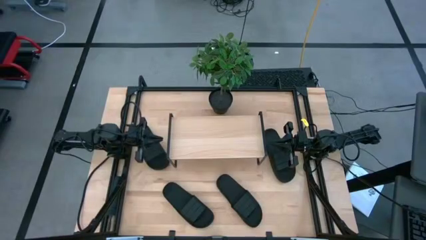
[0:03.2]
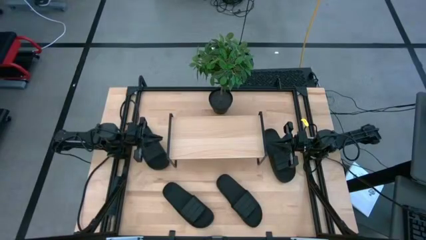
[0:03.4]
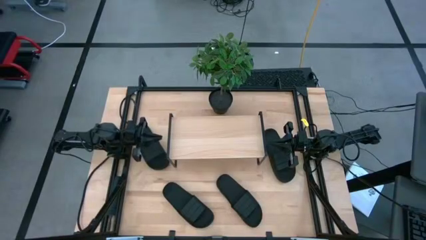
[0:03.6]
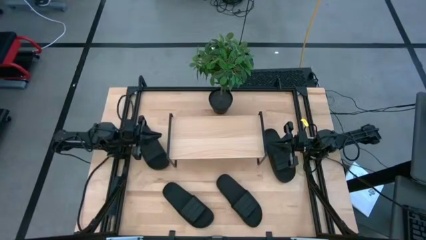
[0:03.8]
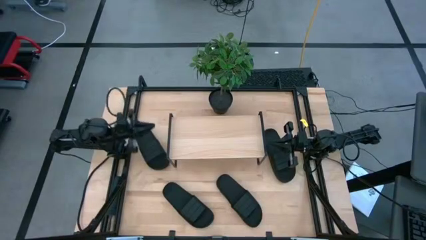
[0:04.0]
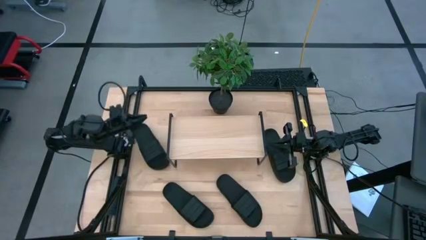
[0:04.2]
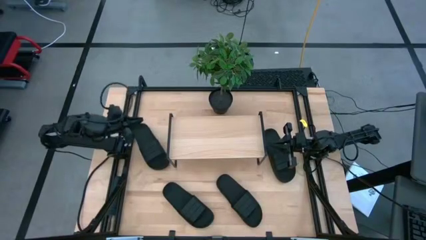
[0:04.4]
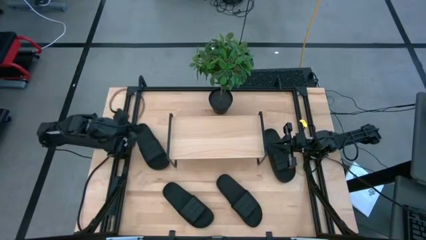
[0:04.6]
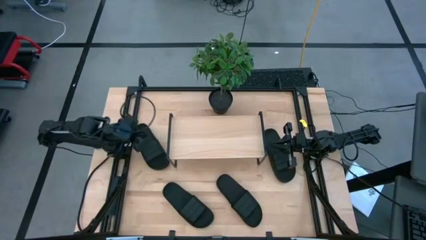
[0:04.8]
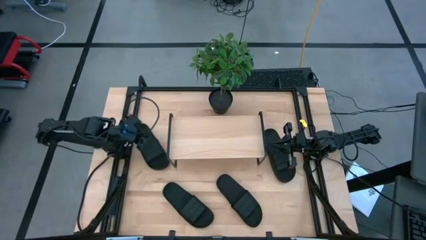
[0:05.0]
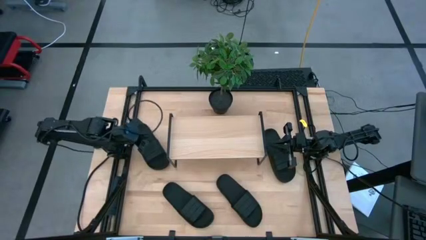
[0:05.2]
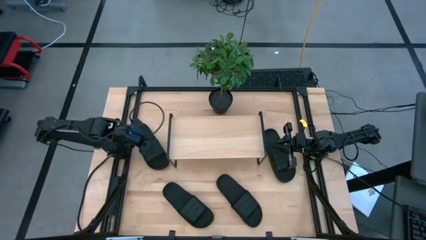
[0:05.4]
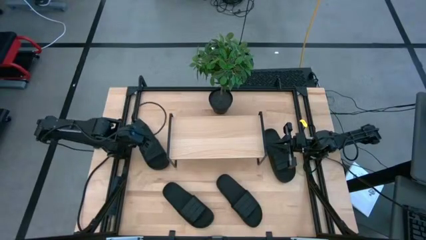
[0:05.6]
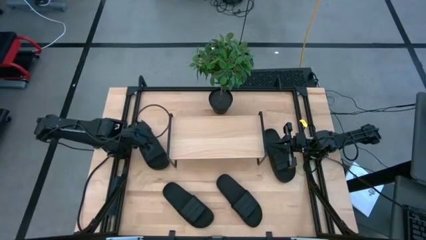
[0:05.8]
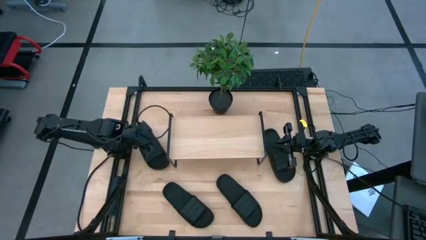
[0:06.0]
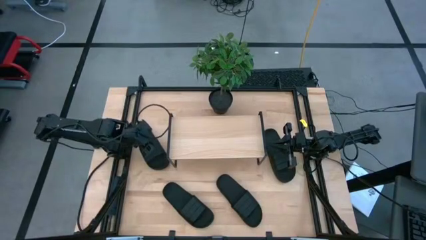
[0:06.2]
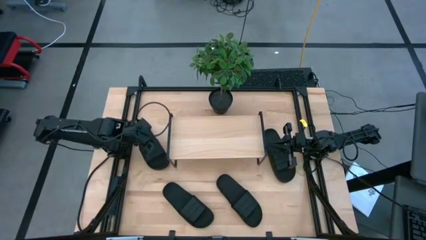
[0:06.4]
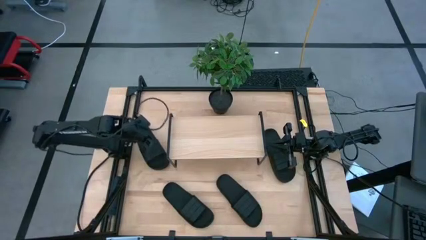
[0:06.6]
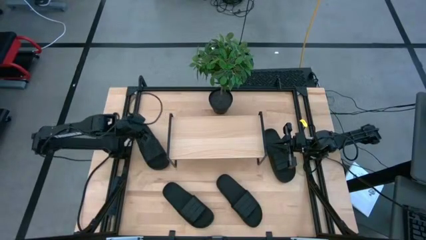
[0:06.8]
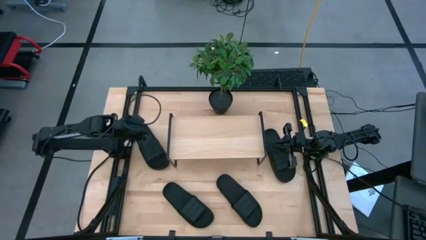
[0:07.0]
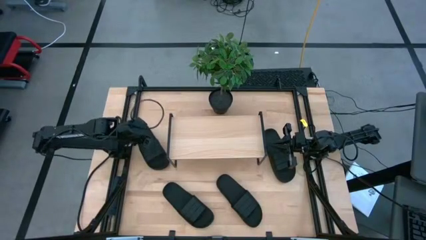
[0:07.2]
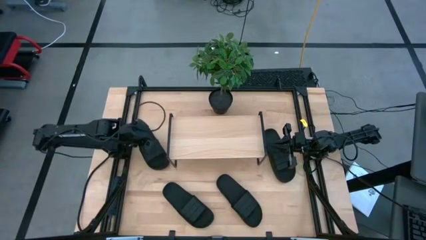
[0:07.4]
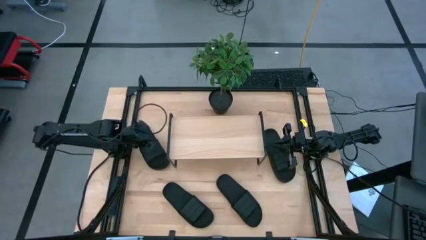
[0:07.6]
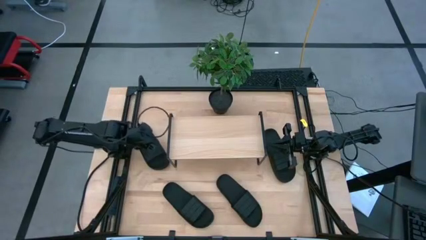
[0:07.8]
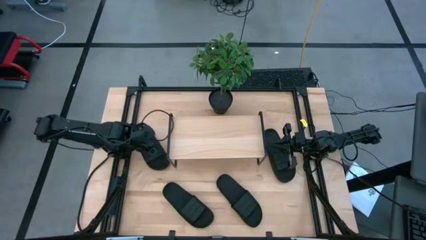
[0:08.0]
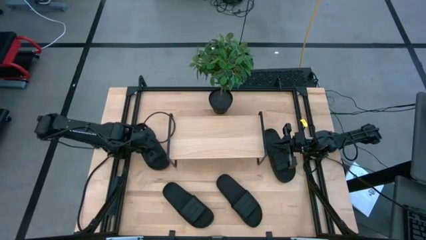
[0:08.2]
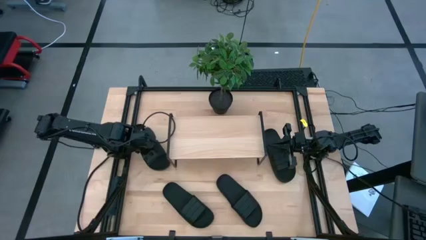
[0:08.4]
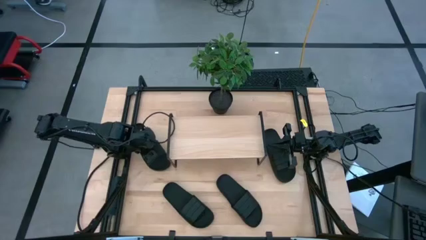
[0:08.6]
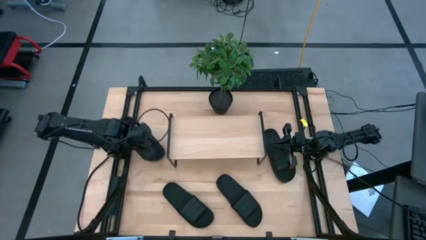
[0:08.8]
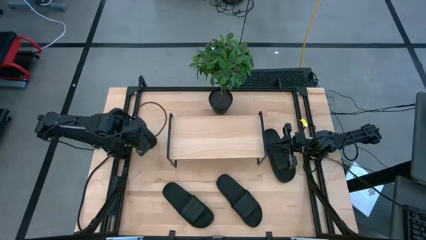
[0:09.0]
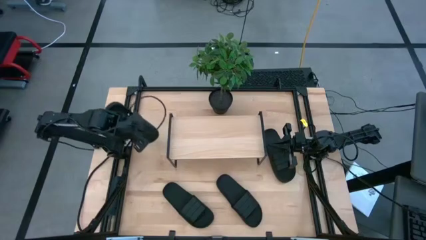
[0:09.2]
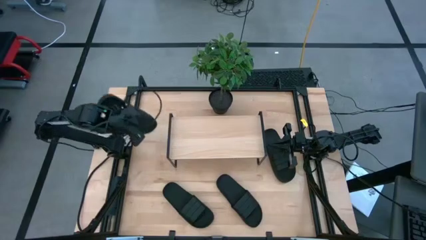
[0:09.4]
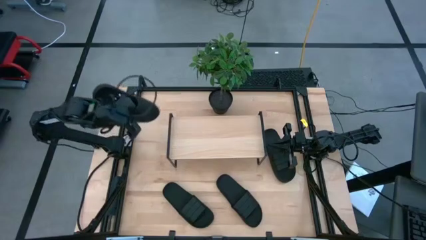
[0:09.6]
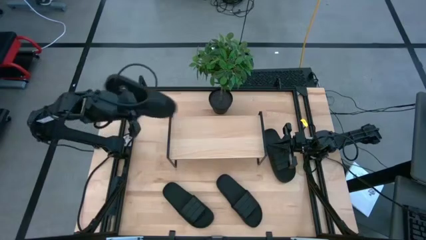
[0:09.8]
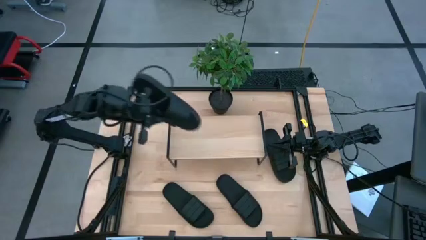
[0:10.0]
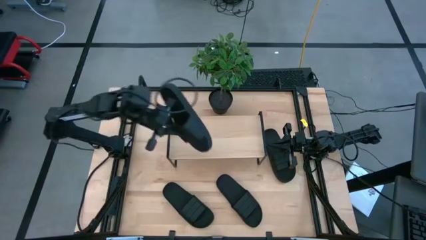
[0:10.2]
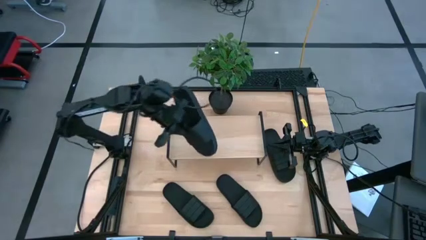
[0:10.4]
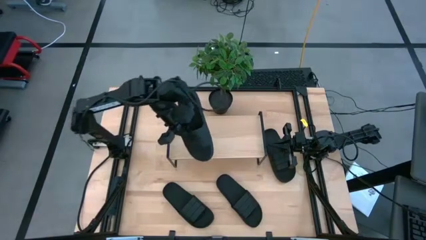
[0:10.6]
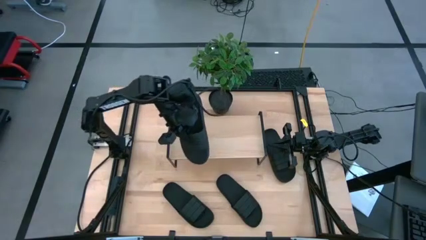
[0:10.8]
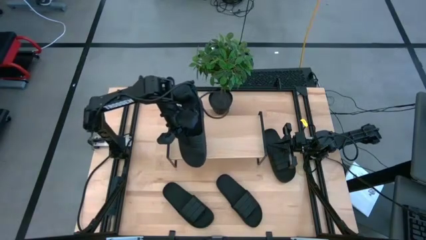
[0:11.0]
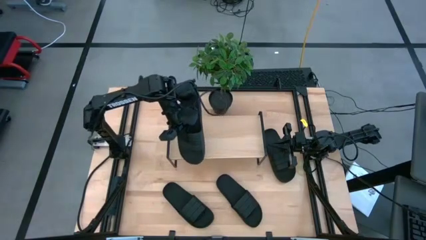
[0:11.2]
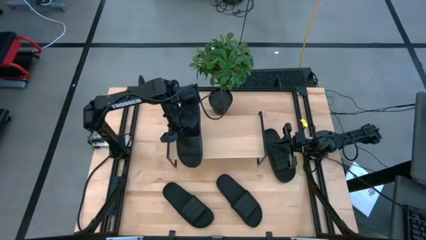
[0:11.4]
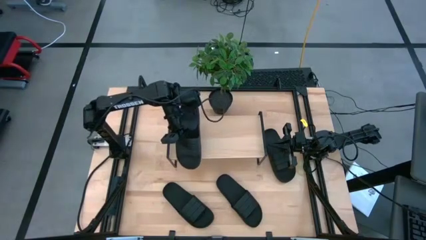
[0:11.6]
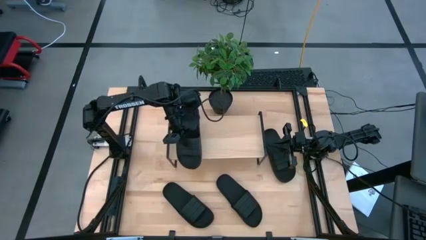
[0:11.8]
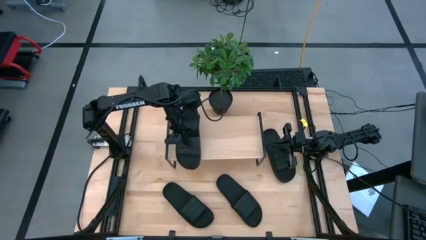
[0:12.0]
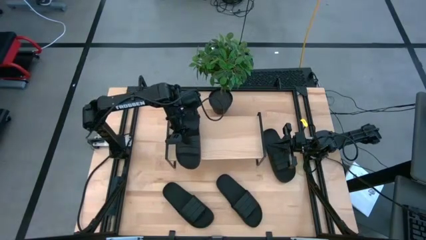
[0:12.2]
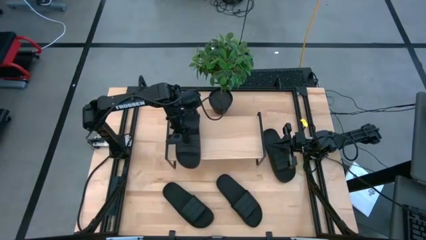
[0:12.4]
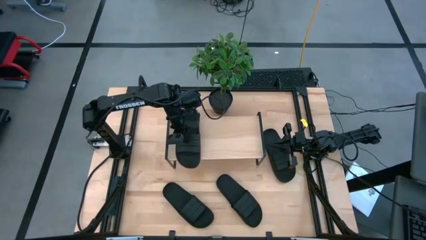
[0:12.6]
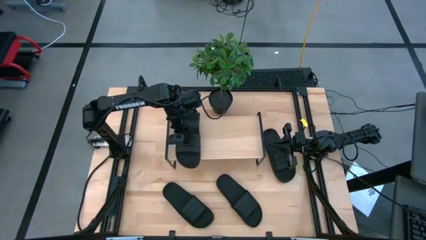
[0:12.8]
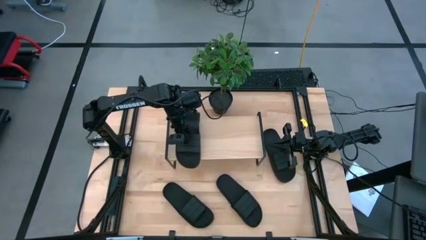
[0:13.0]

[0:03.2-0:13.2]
Task: Pick and place slides into the shelf
Put the top left black slide on the shelf
